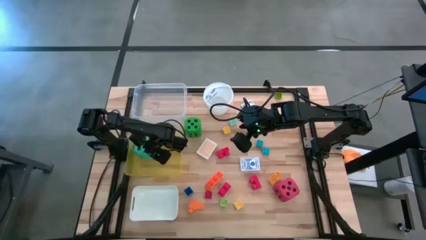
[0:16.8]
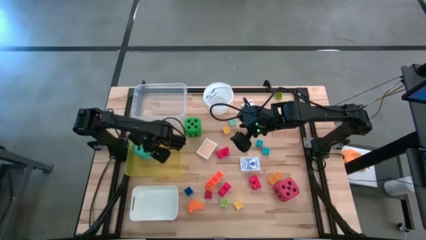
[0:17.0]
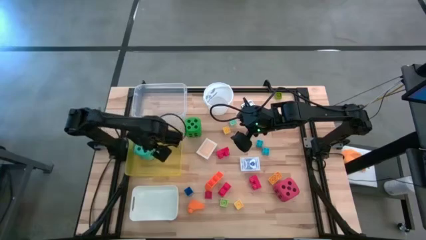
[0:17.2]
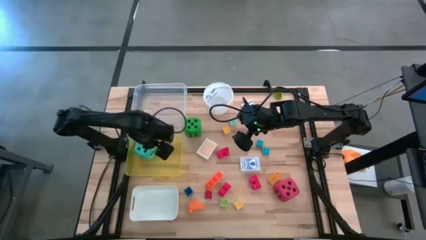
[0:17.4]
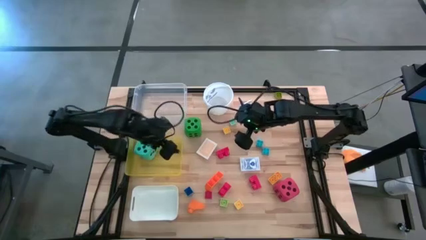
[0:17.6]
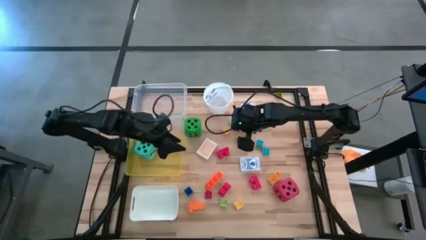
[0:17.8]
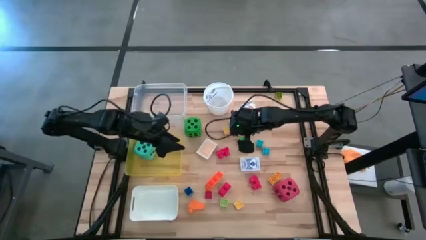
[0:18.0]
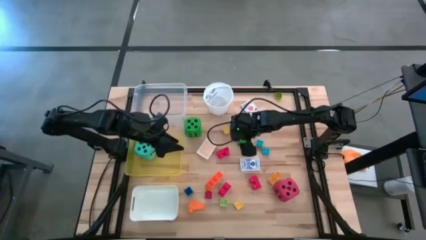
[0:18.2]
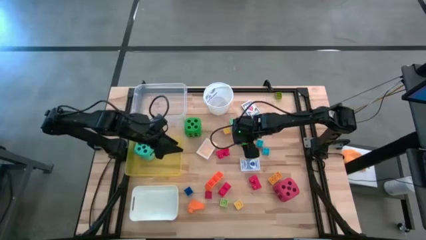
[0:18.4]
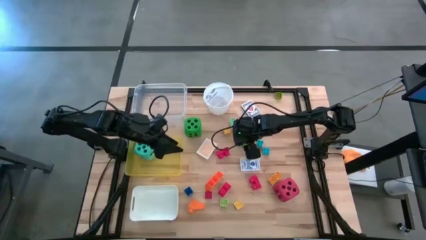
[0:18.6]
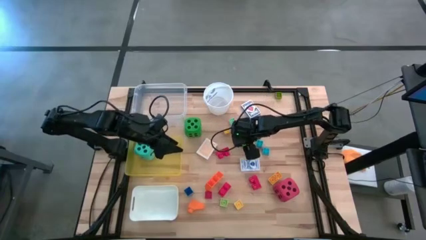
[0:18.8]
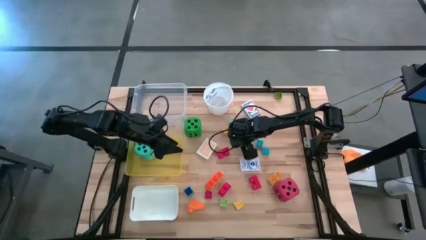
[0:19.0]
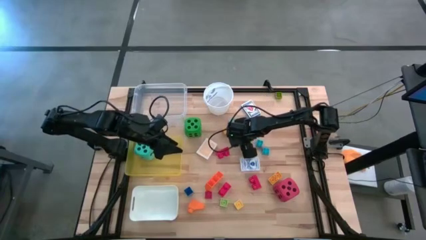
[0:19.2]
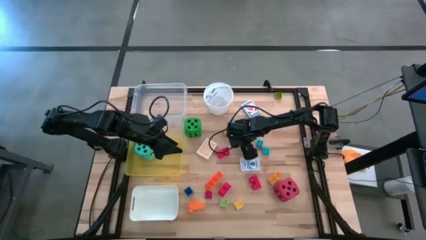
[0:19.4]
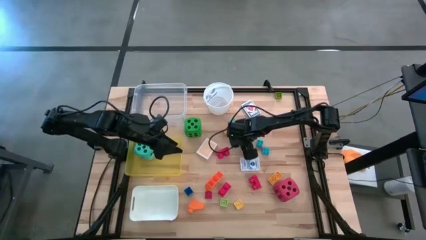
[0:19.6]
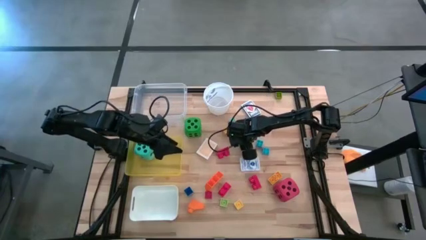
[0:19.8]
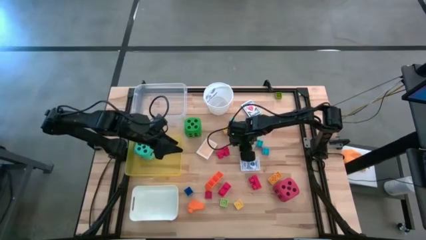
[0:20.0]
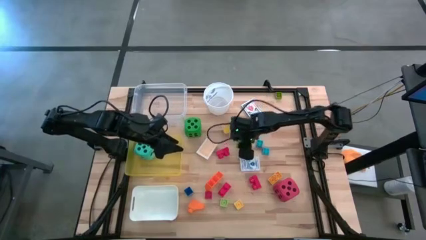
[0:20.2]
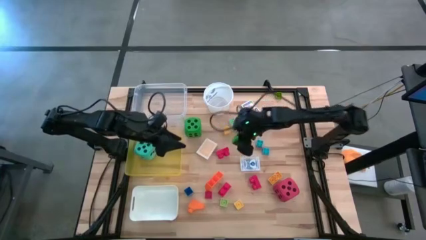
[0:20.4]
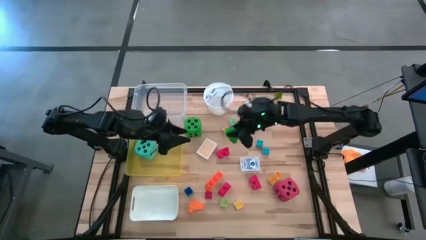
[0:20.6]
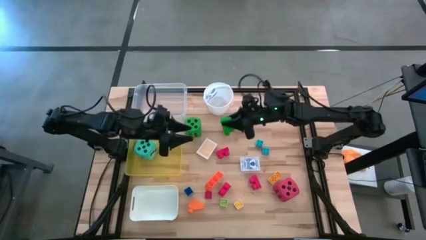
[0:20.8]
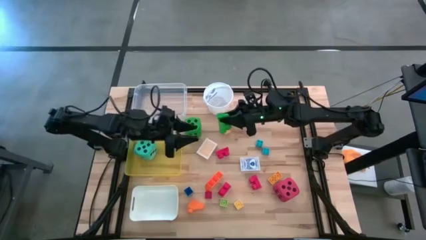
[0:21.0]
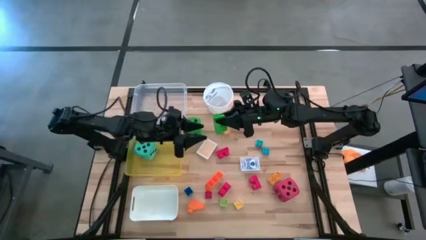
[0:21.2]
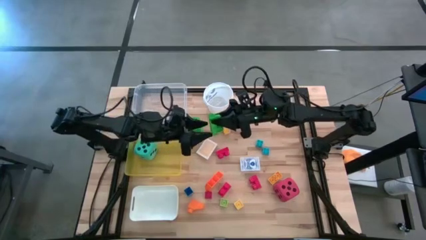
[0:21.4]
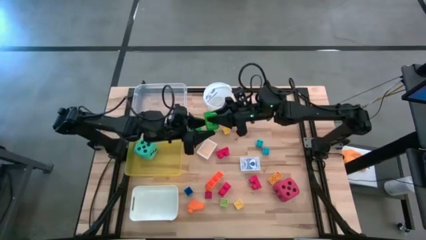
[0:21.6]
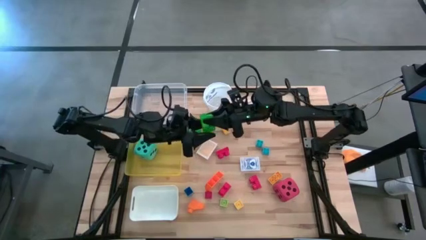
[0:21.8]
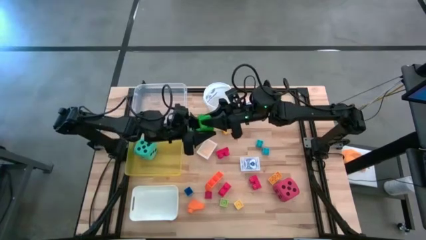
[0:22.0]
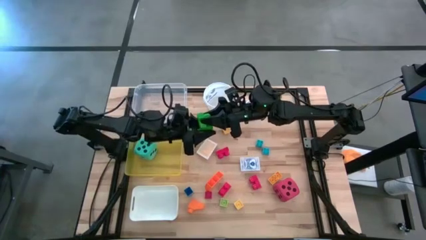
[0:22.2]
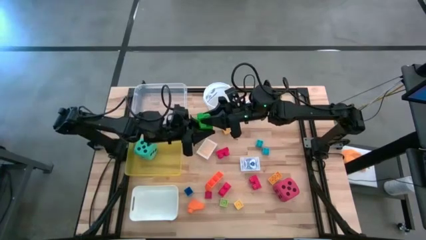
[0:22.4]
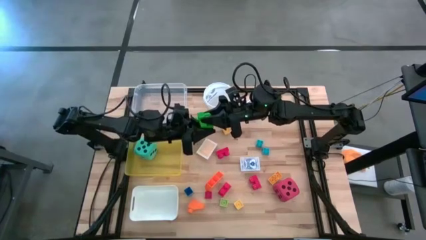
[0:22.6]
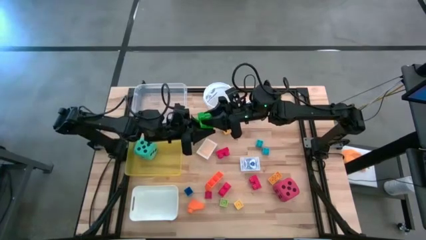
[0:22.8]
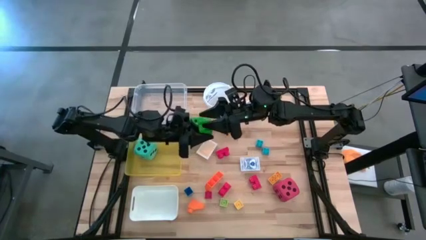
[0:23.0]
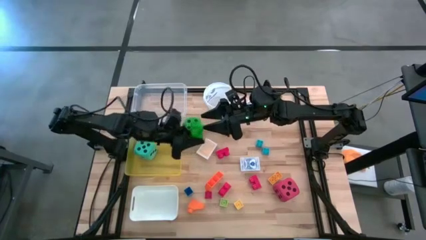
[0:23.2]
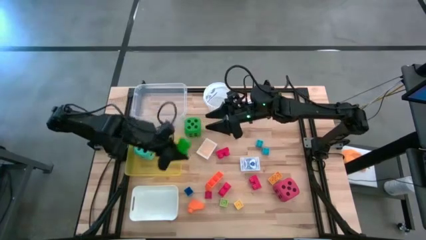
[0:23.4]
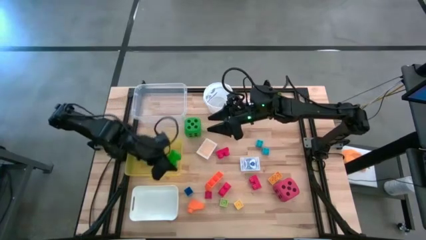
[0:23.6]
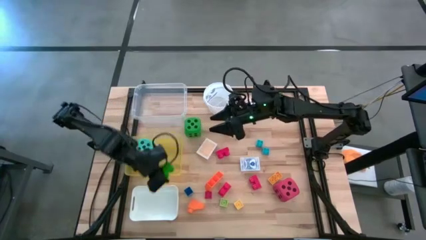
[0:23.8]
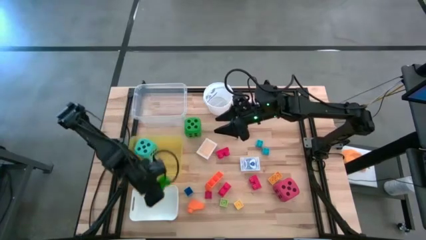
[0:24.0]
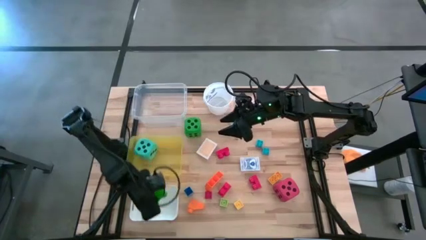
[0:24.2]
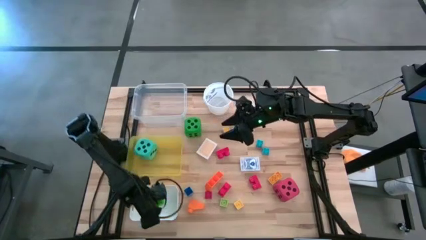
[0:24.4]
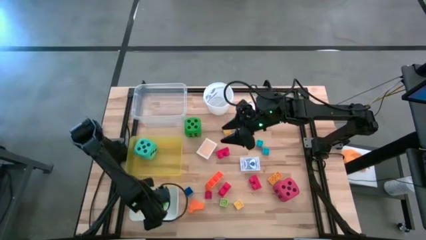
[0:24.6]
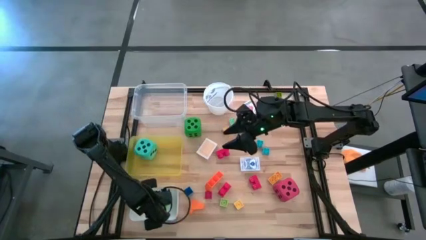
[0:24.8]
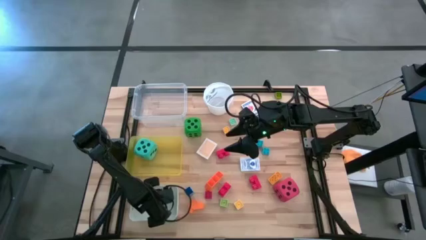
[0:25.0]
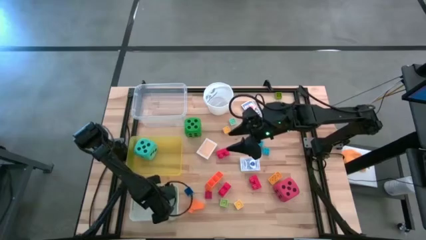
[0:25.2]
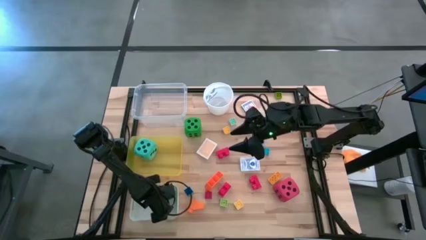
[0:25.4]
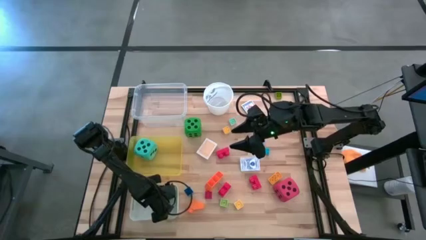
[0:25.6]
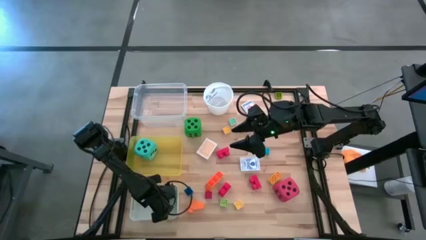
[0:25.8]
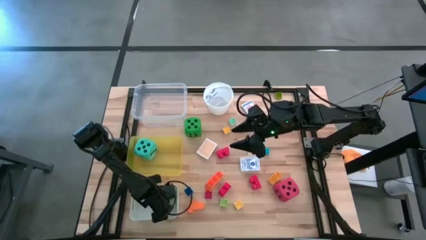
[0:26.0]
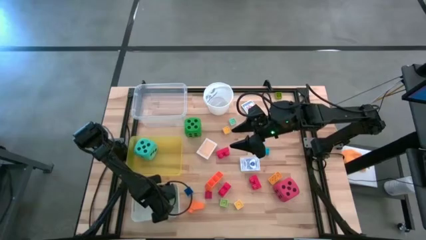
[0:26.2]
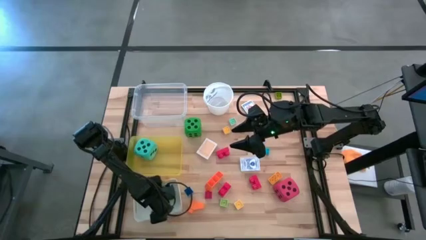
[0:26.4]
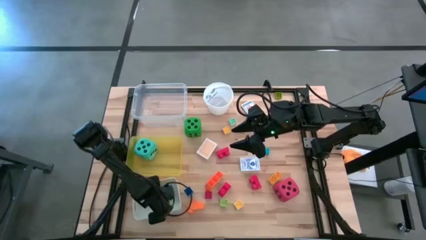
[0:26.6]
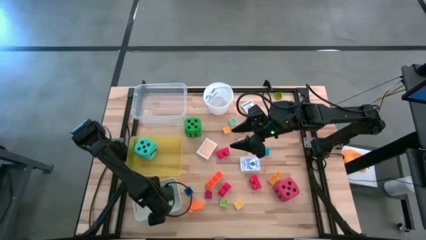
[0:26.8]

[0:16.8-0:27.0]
Task: Pick & Place Toys
Put the green game piece into the white bin

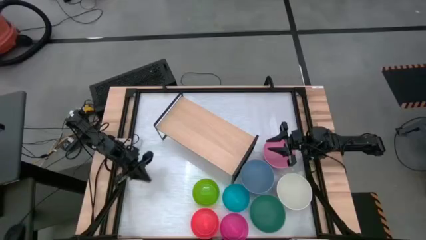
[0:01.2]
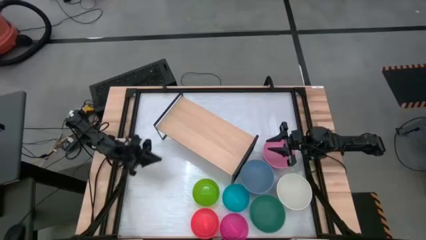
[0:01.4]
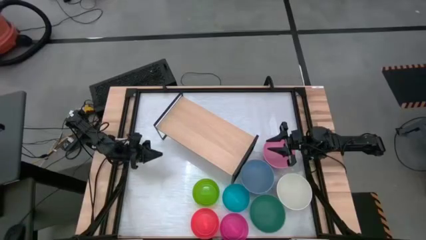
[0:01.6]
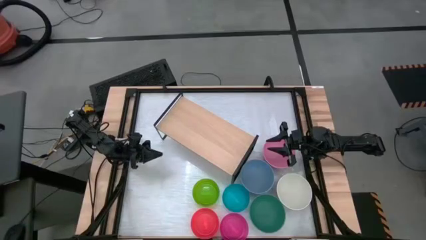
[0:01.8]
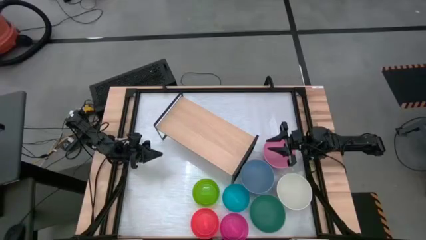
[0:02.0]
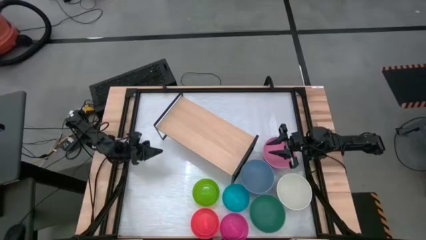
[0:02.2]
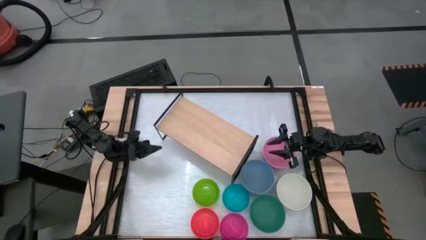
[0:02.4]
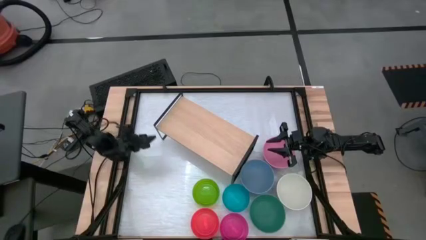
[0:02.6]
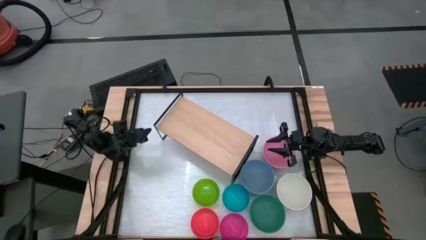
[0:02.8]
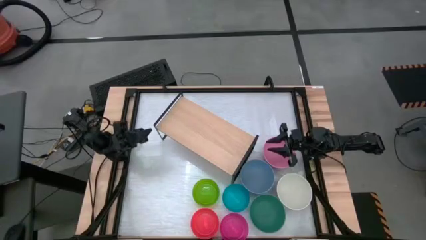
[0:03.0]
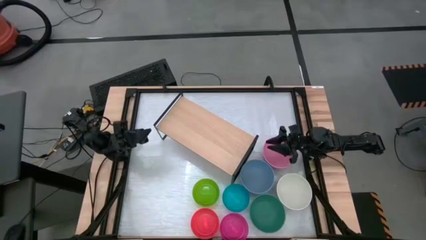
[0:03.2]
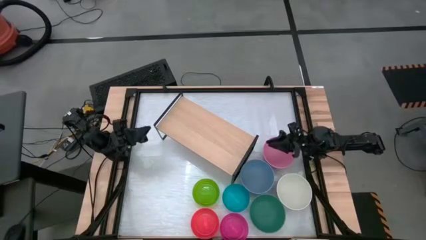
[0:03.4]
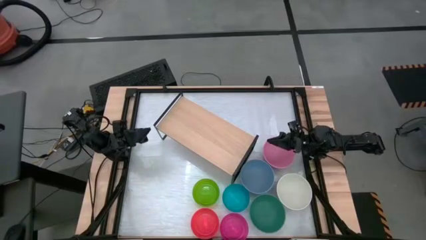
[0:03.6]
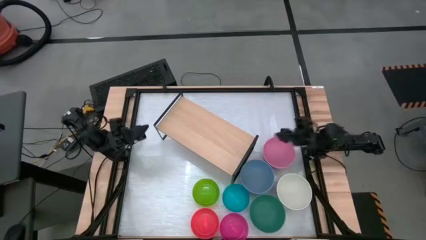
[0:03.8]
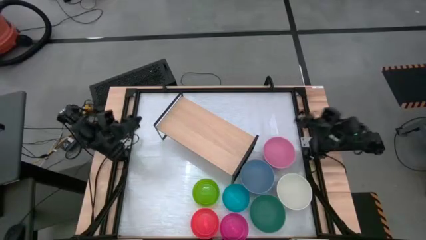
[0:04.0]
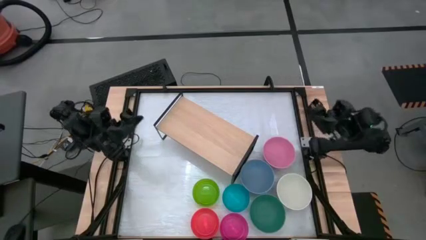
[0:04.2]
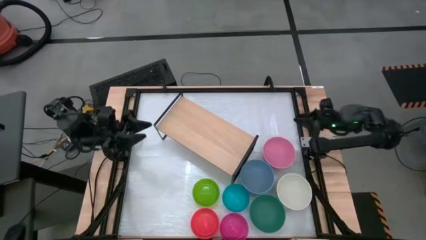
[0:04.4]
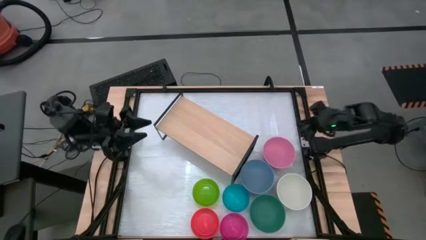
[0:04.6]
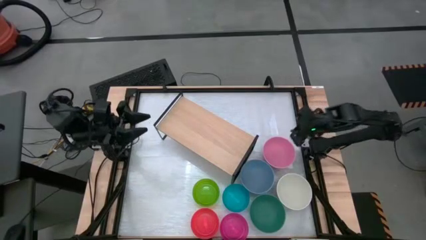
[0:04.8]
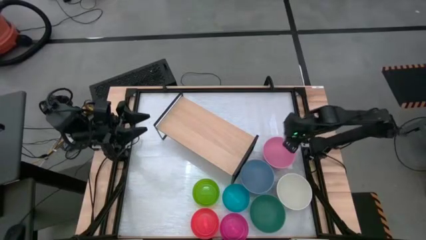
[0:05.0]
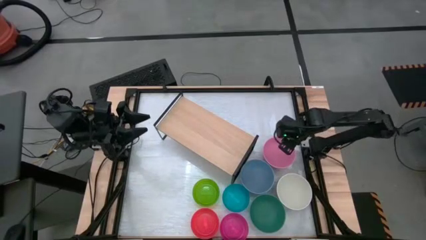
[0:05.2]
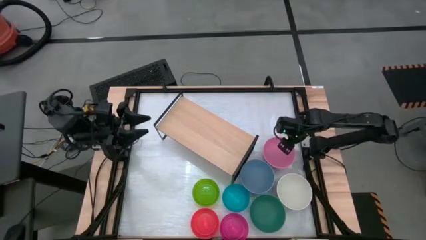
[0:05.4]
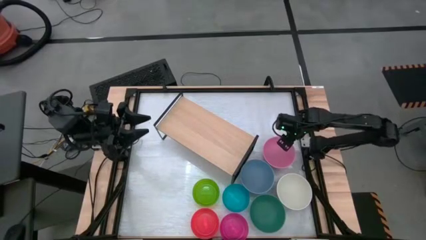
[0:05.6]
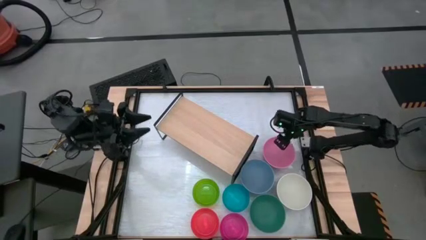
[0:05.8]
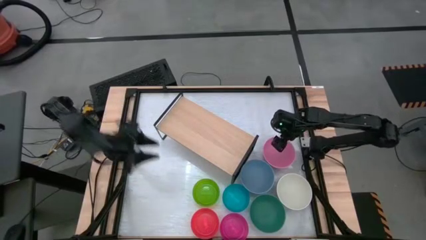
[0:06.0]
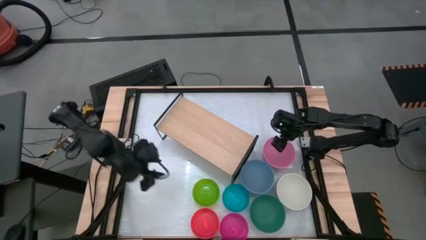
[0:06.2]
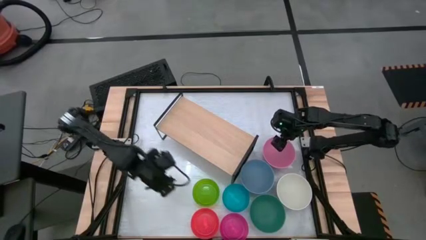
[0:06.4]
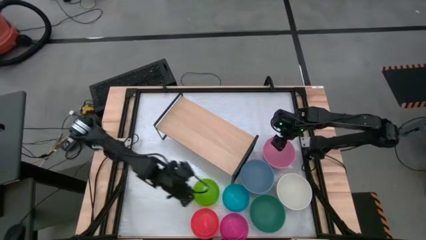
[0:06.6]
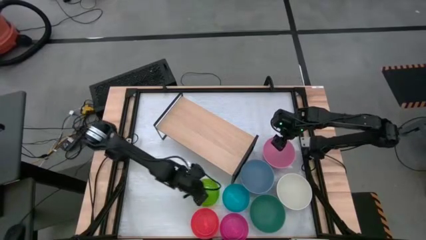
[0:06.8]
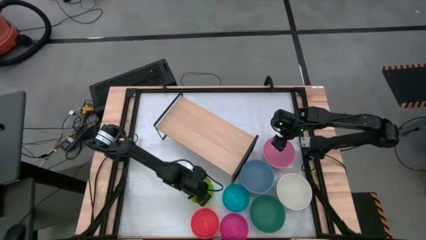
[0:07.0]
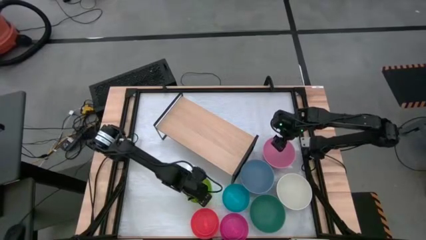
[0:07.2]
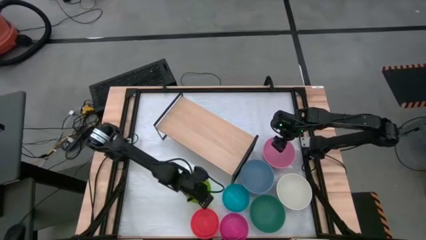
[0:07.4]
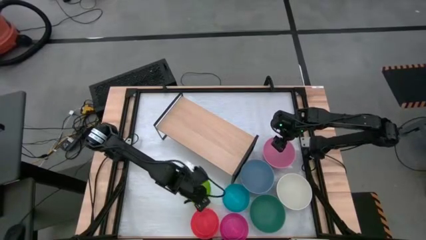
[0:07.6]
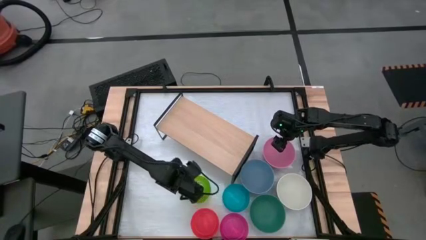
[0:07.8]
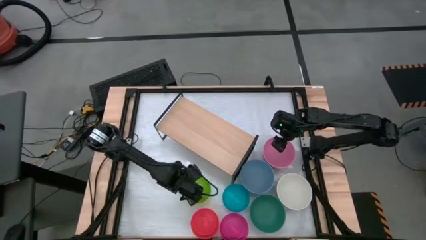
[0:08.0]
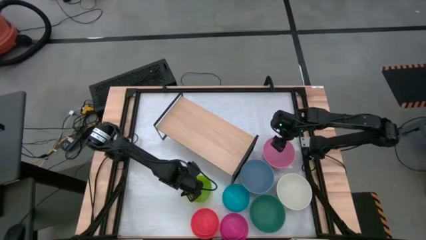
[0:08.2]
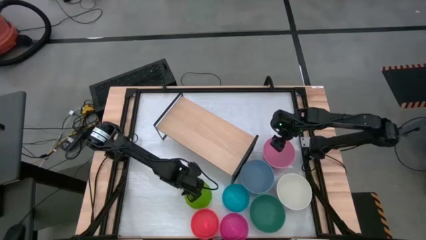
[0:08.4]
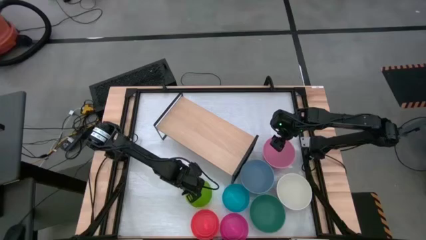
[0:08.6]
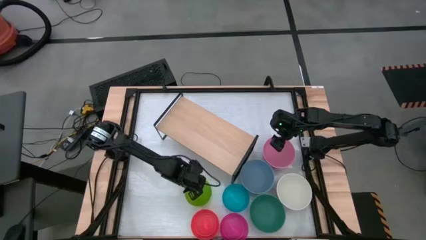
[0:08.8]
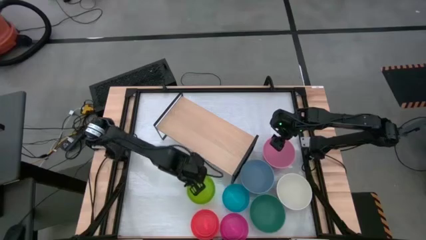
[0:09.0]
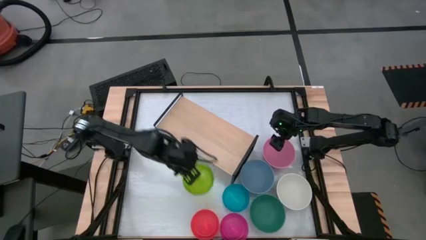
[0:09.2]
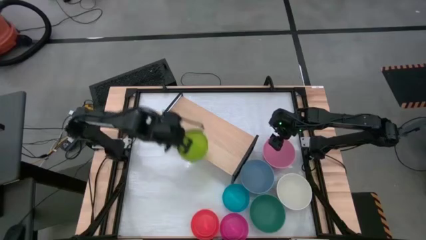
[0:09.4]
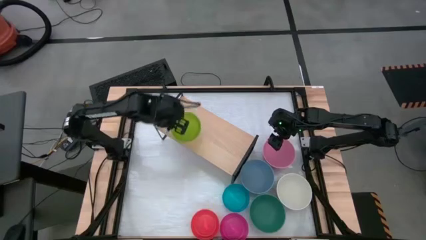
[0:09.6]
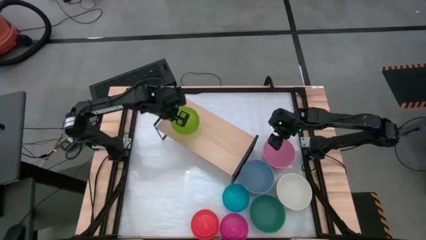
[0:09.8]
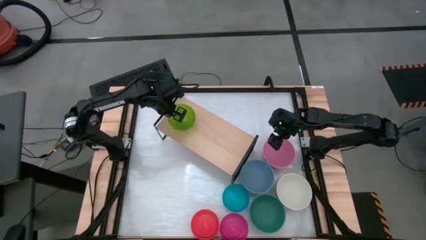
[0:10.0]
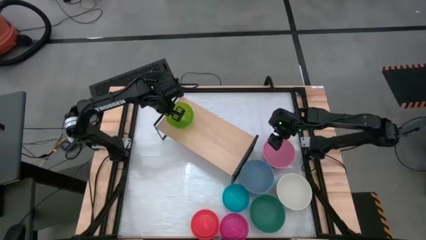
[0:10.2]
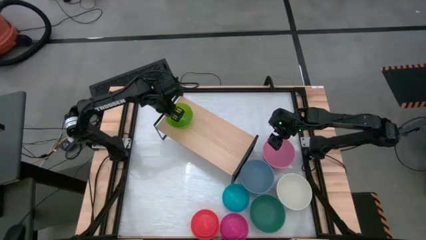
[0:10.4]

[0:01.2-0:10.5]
Task: Place and stack bowls onto a shelf
Put the small green bowl on the shelf
